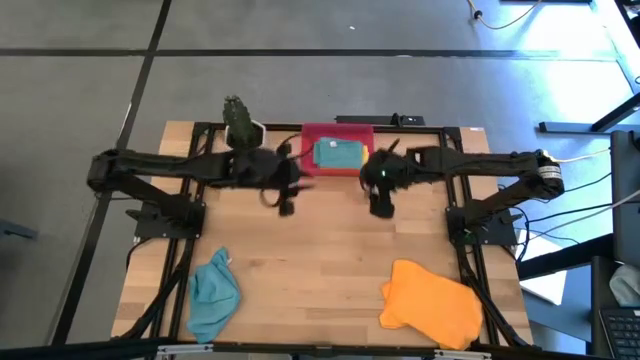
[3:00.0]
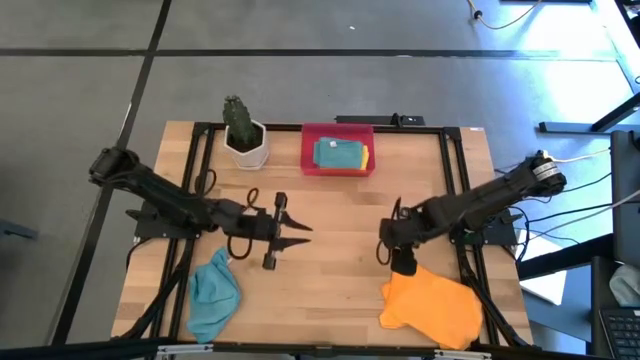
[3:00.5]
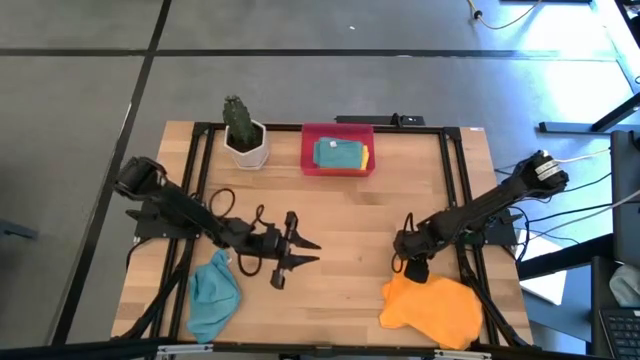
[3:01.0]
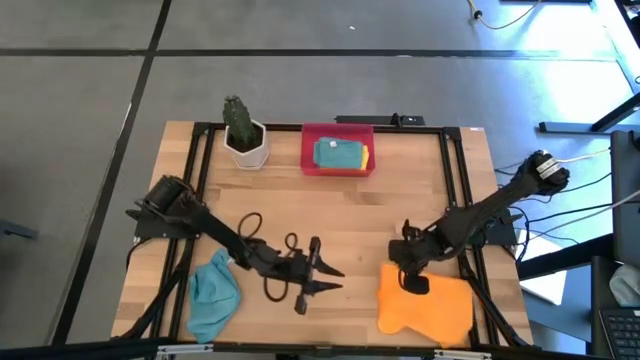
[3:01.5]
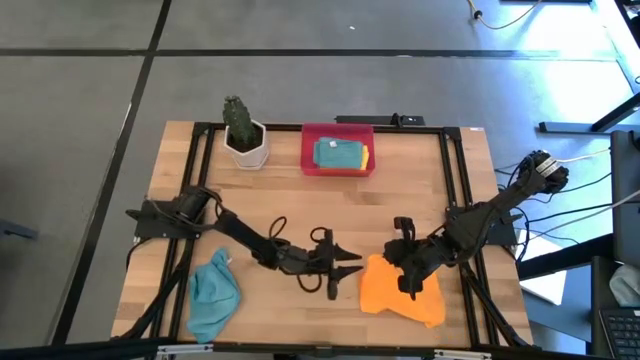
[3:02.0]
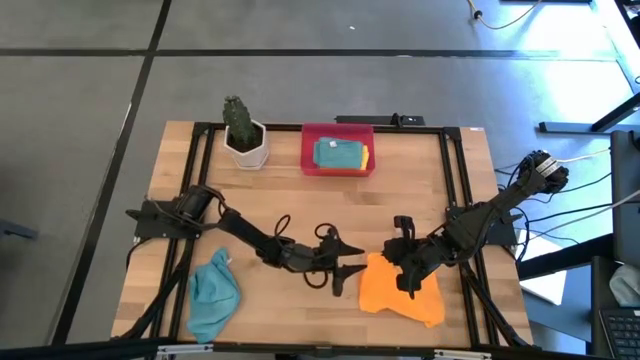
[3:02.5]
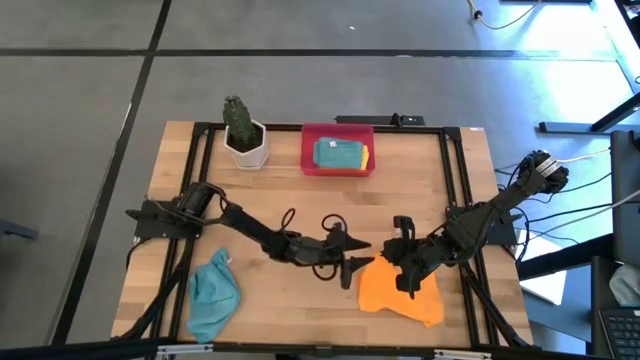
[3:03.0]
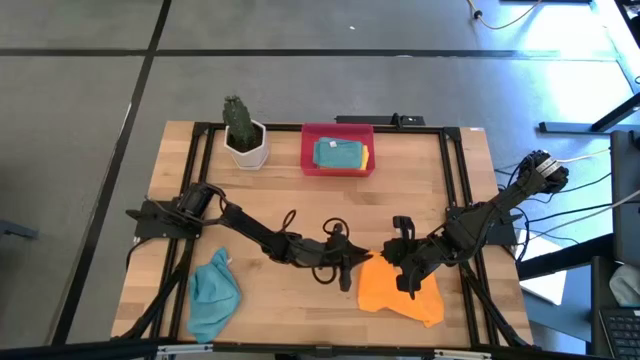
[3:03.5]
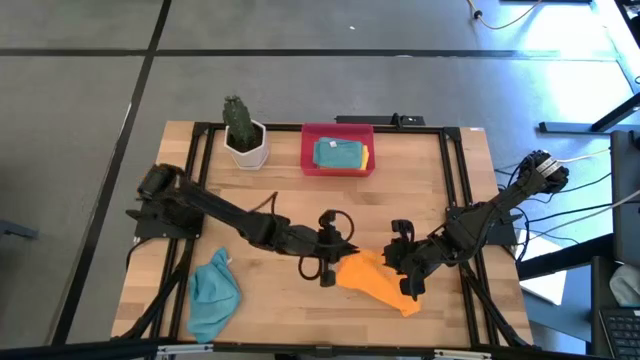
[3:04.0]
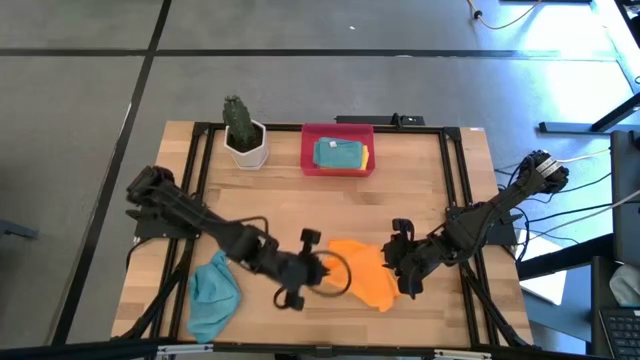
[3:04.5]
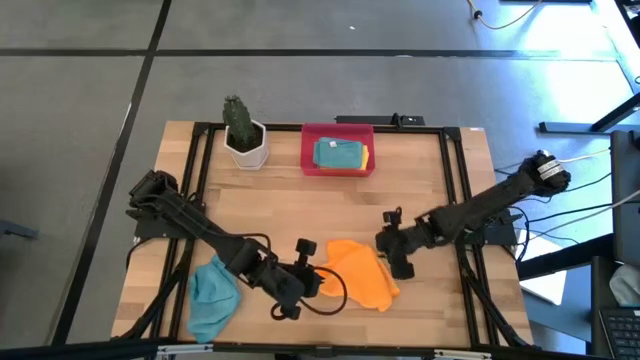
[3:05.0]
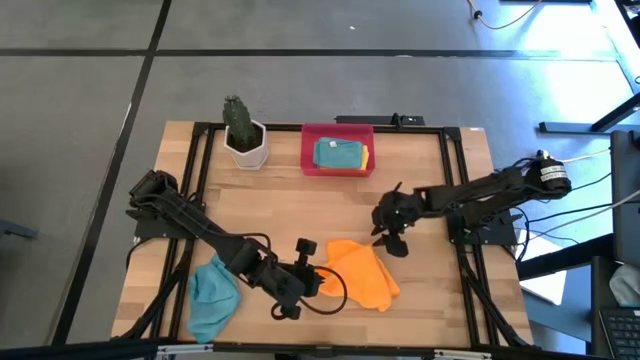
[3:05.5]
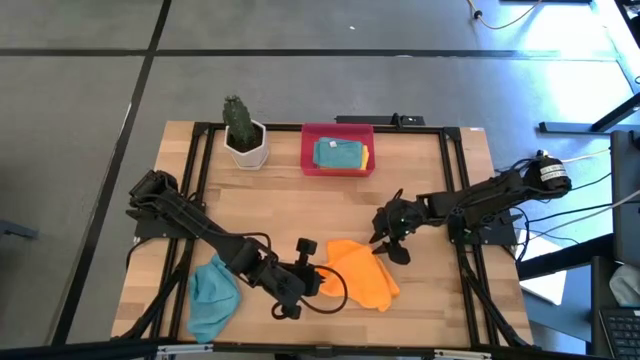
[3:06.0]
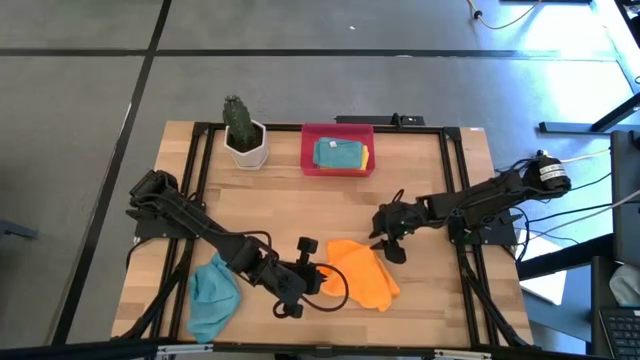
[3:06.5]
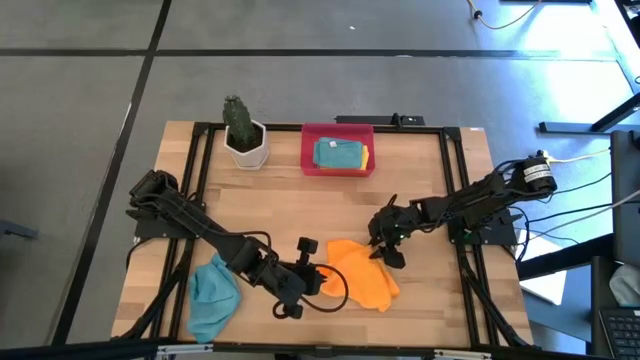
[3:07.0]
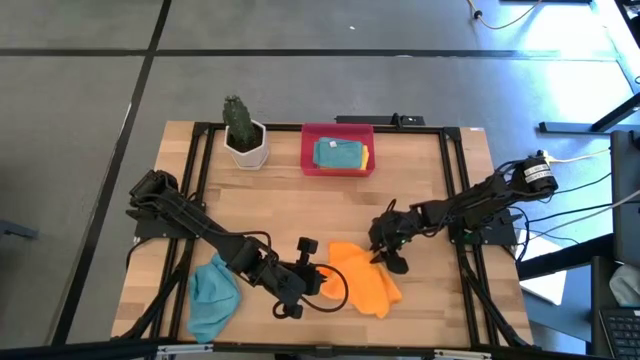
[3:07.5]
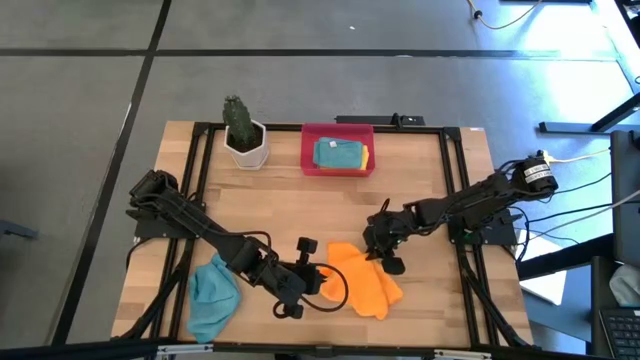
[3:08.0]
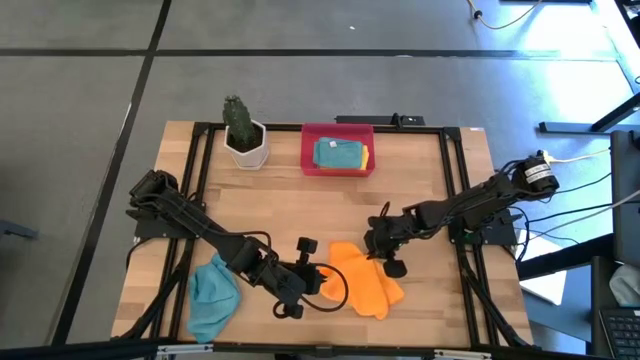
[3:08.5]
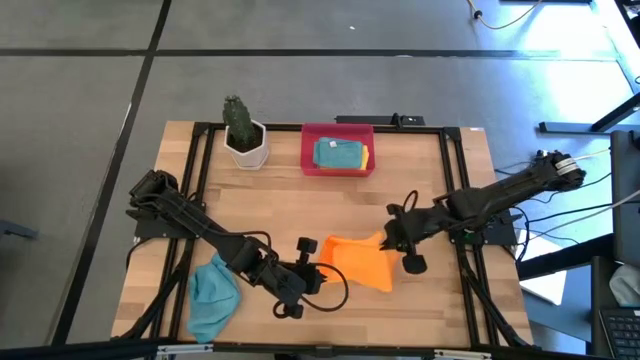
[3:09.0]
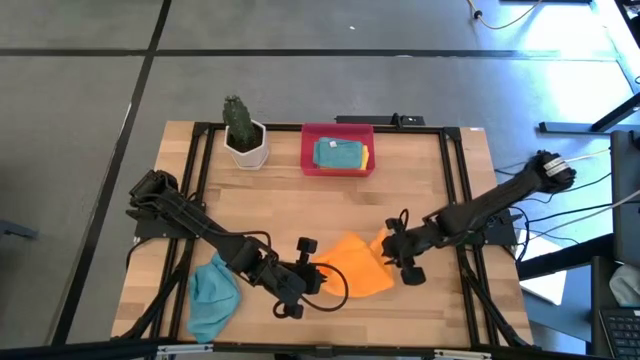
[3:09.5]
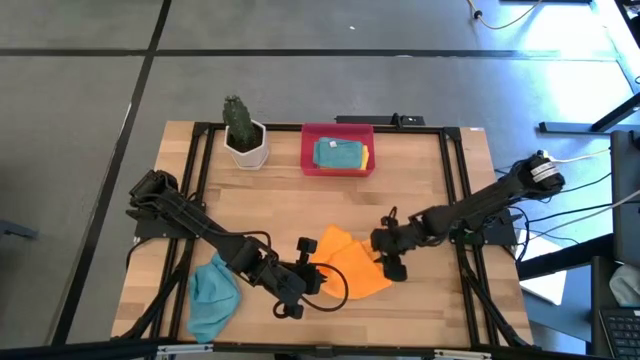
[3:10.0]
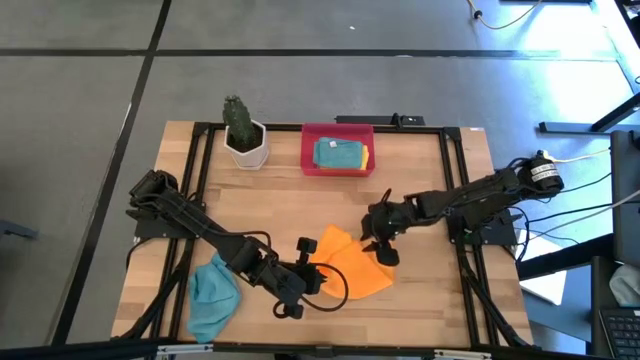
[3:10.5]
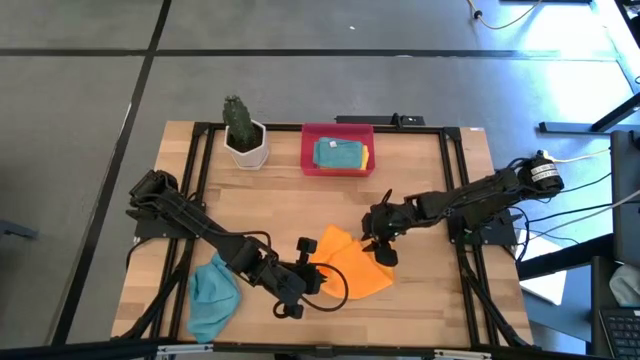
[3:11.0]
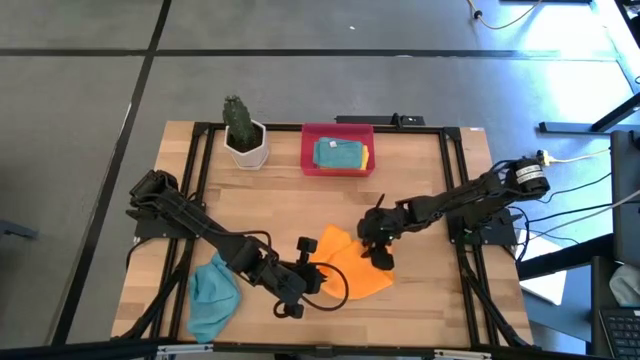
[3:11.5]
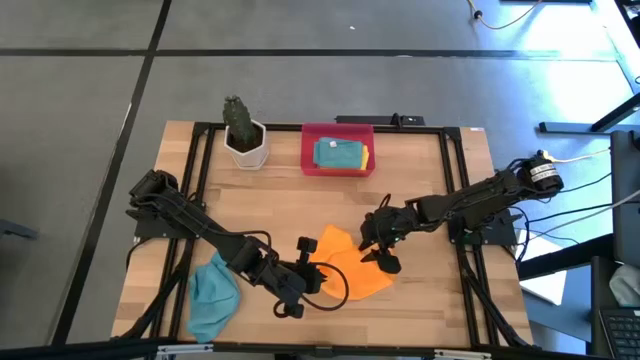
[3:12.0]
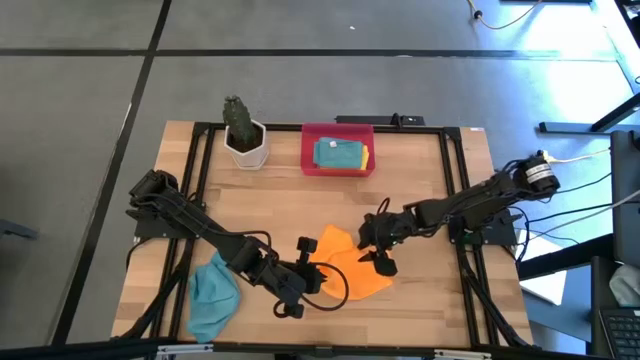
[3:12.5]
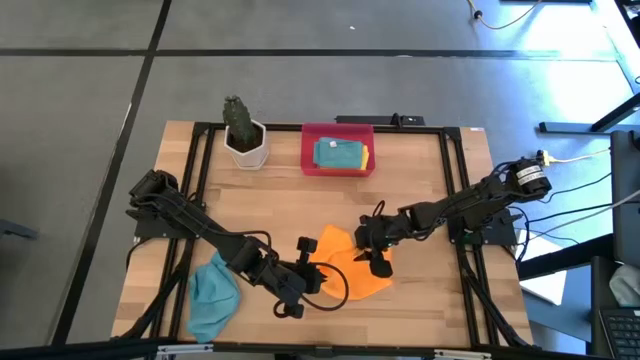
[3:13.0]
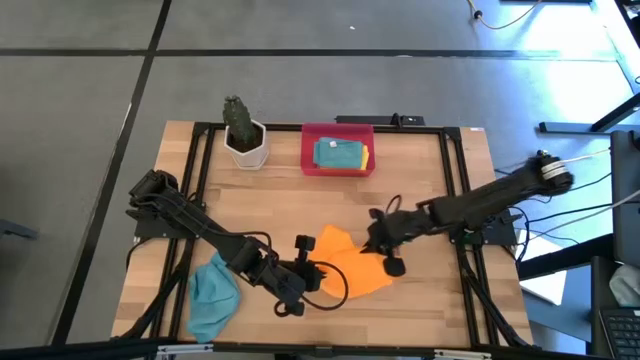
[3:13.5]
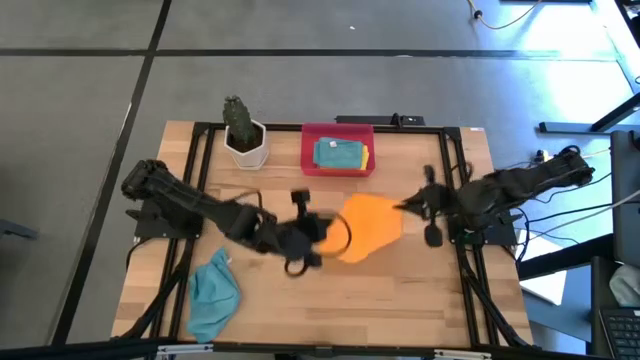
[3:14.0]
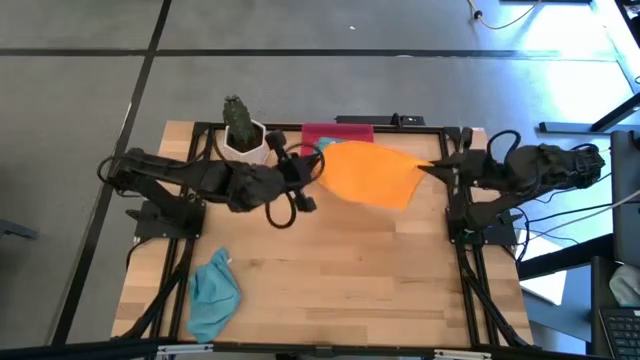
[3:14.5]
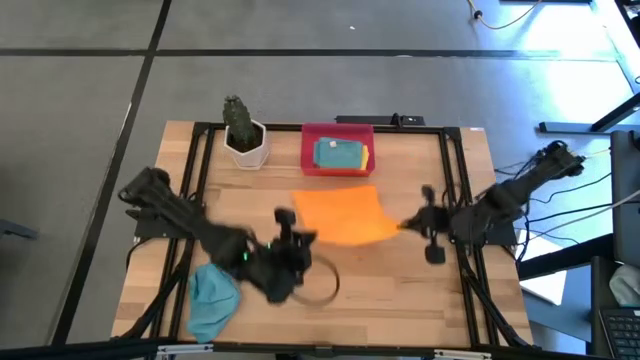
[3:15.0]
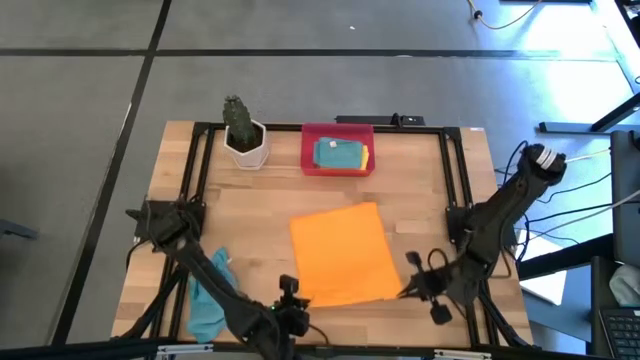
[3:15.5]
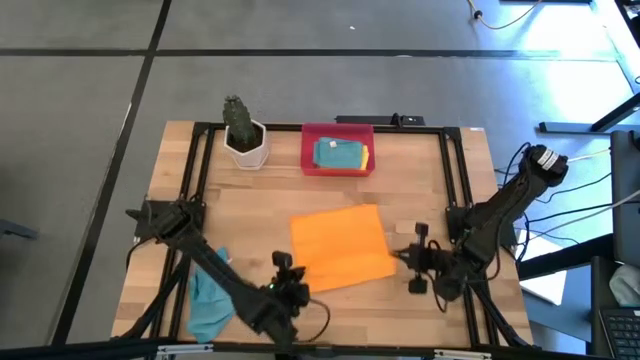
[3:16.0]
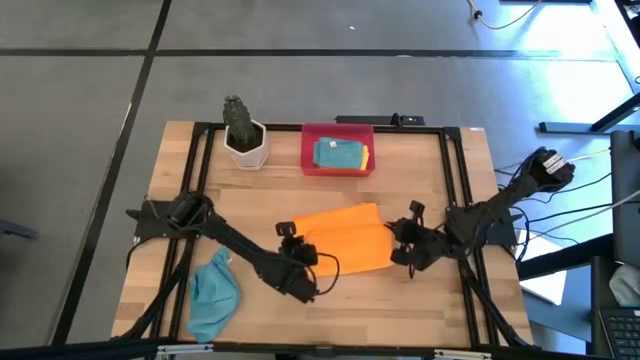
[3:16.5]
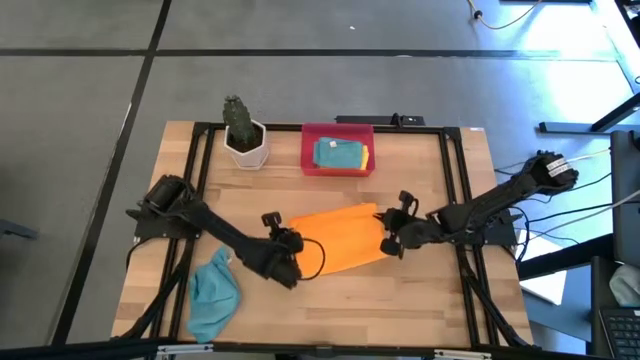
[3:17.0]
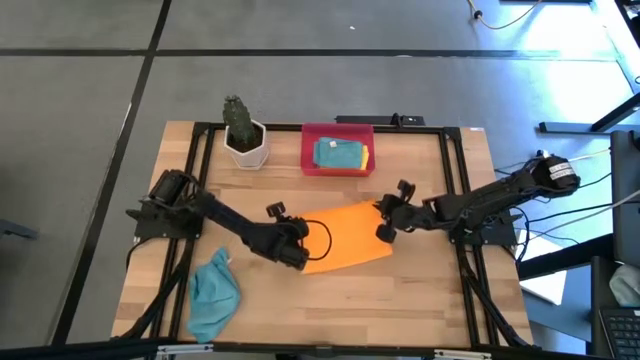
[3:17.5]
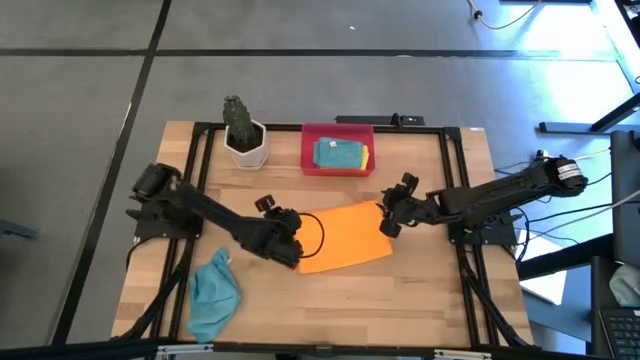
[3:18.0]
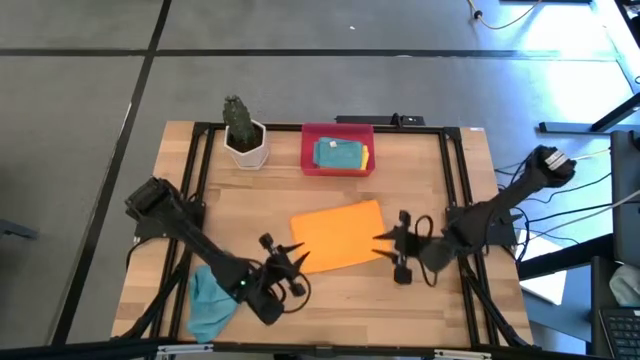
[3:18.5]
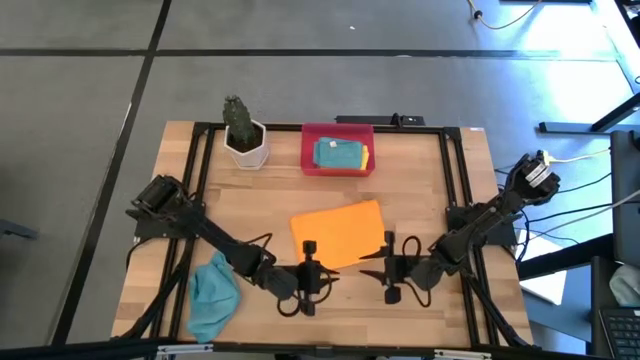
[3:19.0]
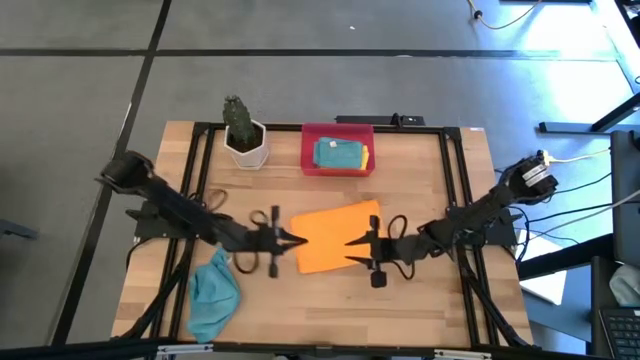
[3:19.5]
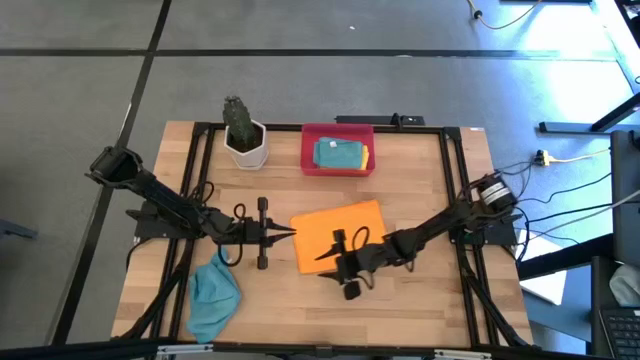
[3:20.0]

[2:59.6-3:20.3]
Task: Fold microfiber towels
Fold the orange microfiber cloth
